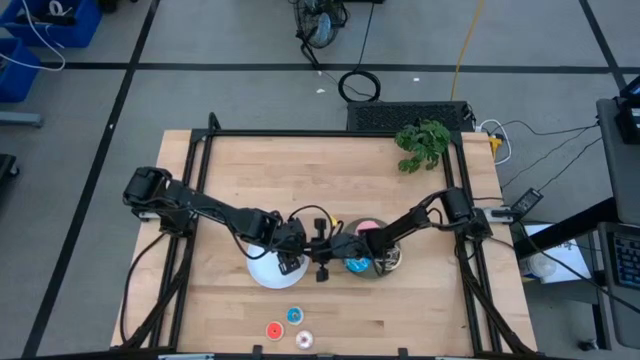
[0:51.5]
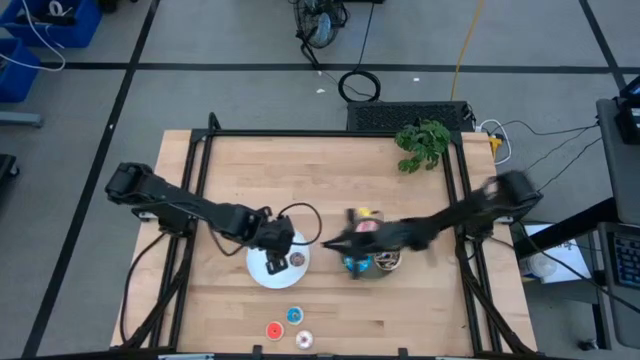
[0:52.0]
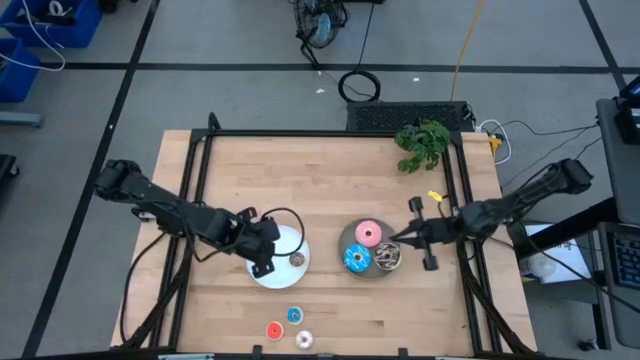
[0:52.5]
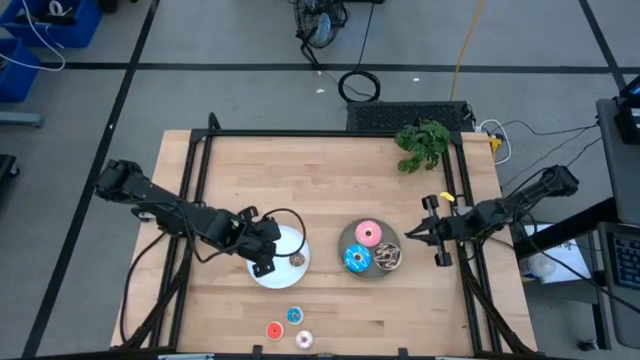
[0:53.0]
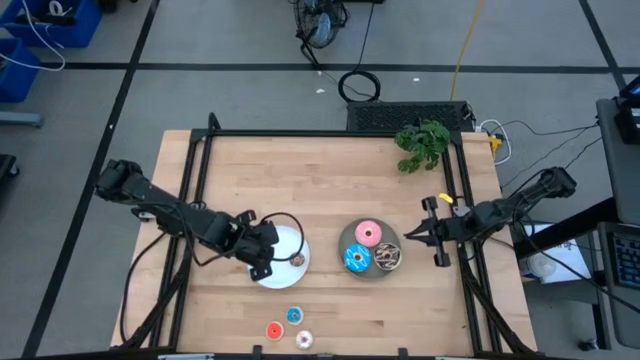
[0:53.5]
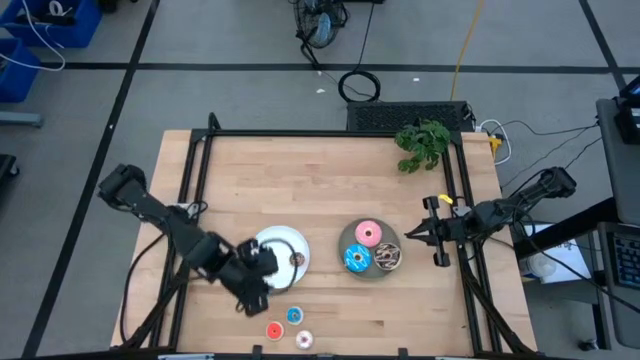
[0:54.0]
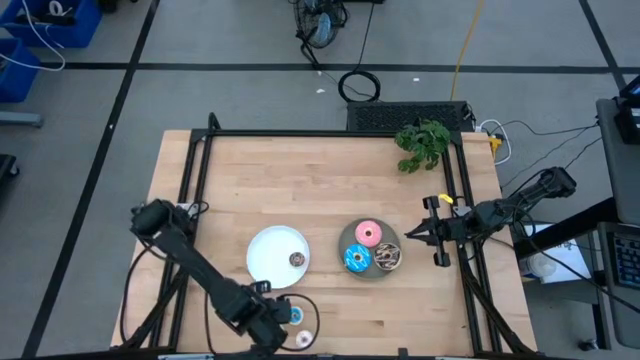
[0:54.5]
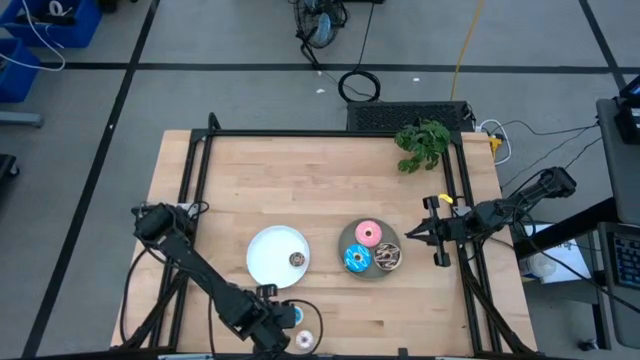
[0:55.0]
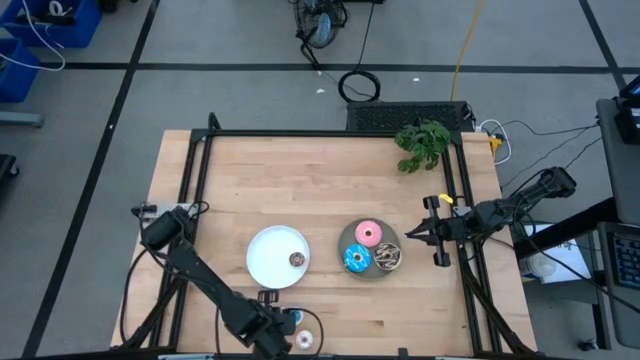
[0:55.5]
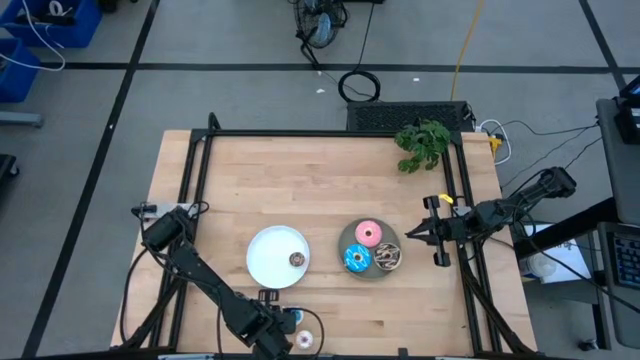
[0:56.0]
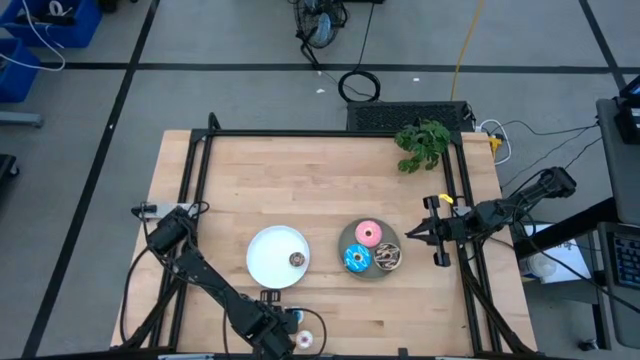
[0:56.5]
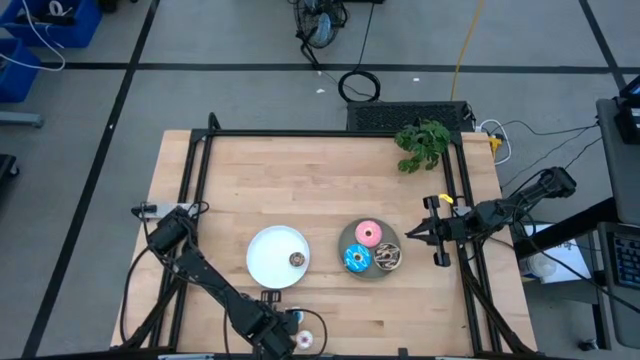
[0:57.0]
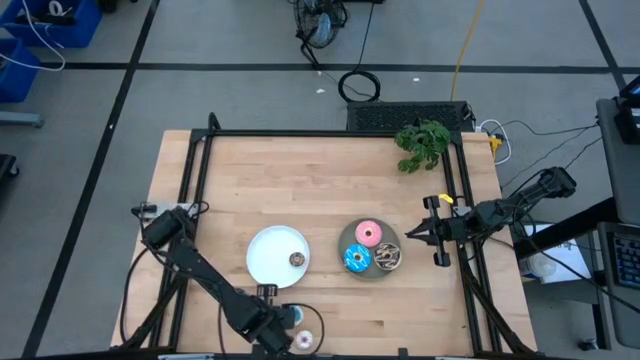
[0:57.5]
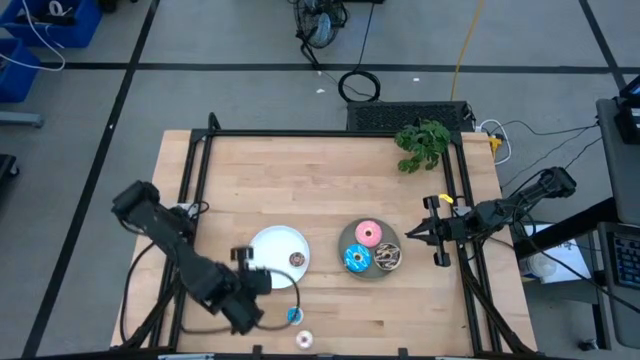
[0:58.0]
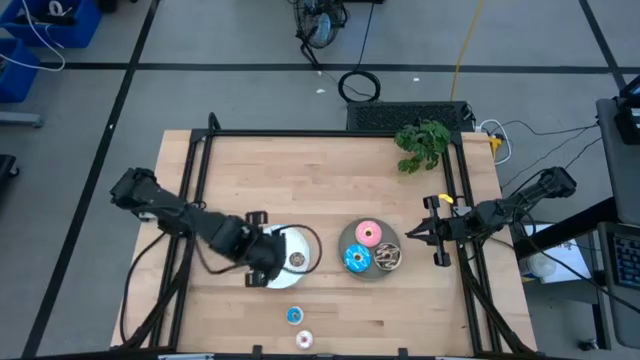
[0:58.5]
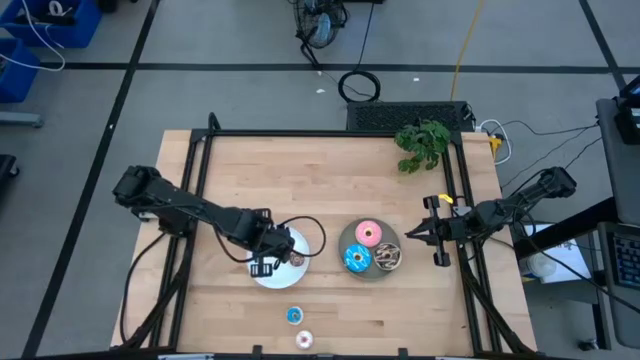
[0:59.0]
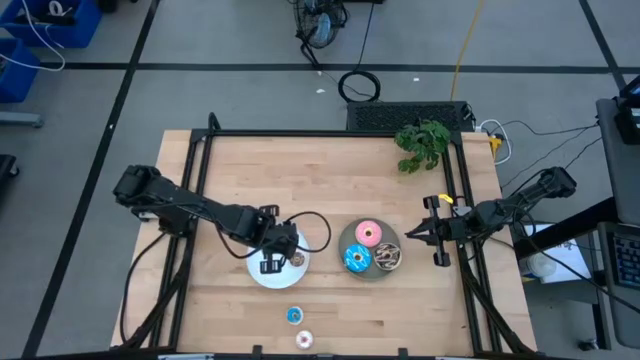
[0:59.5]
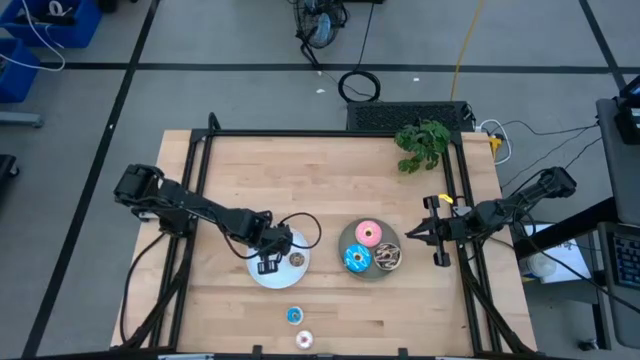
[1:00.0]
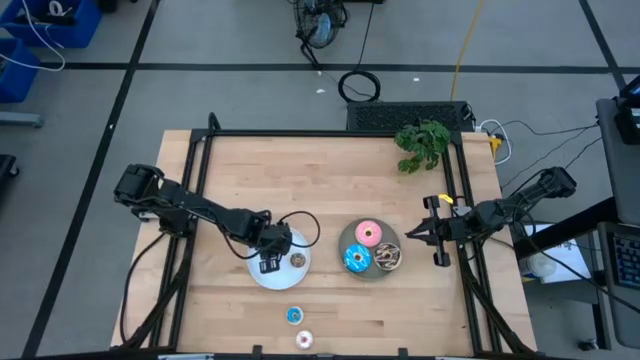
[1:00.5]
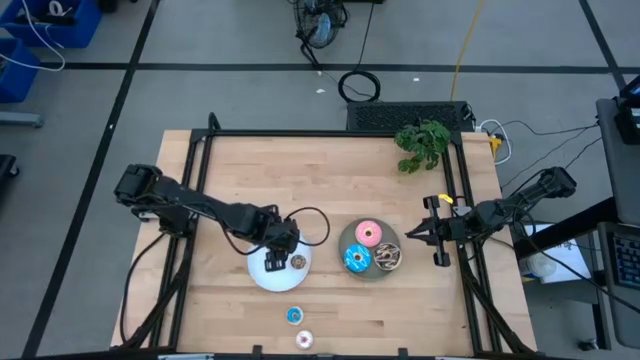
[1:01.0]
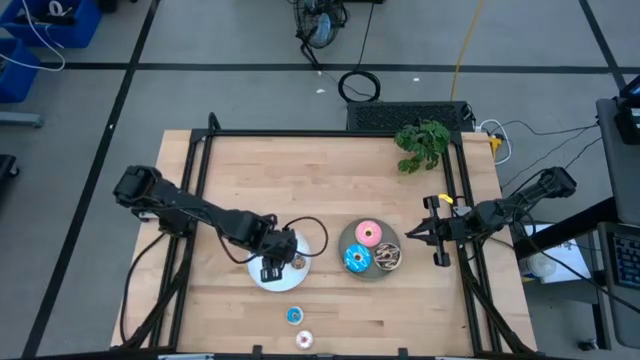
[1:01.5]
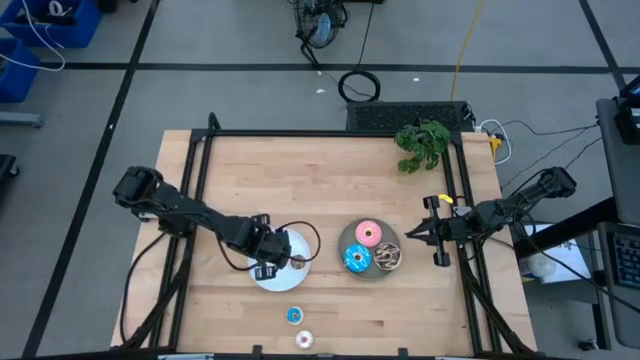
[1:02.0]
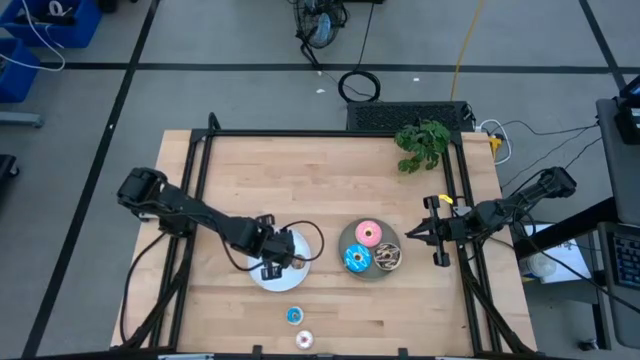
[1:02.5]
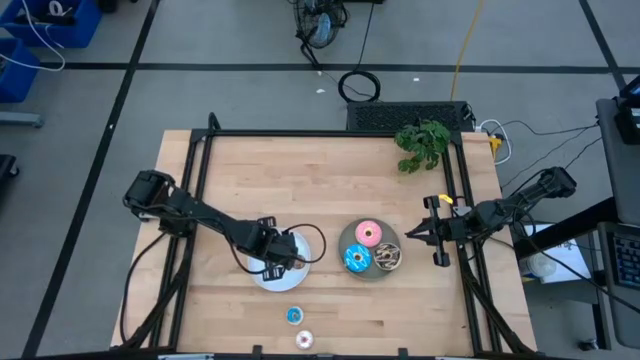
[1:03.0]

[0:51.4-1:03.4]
Task: Pick & Place donuts
Put the small orange donut on the white plate

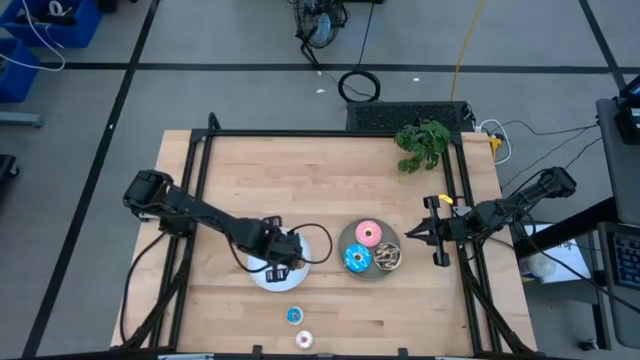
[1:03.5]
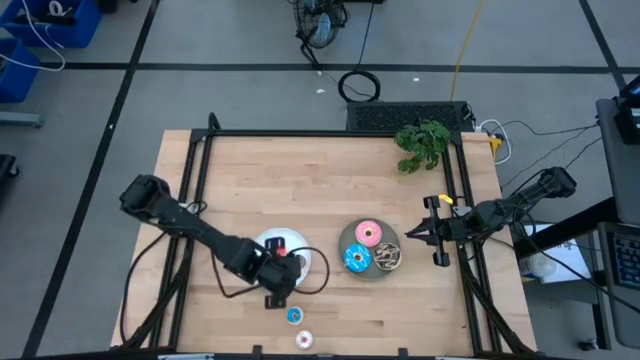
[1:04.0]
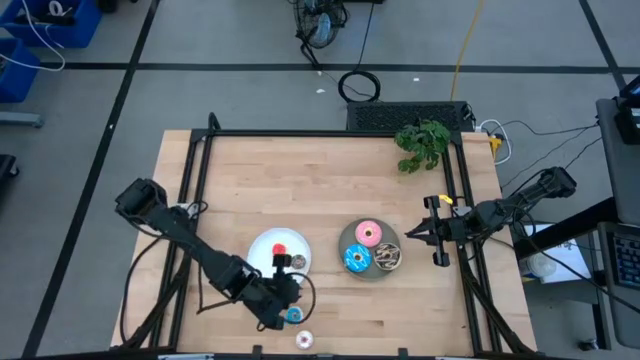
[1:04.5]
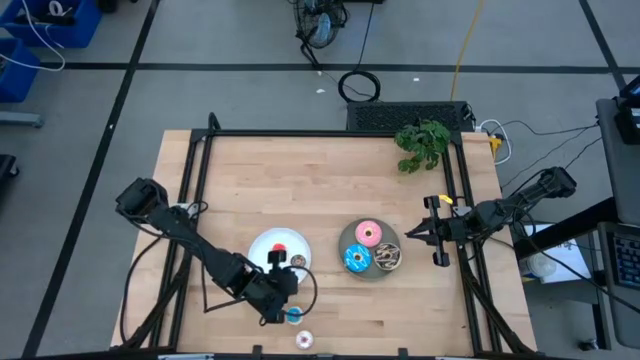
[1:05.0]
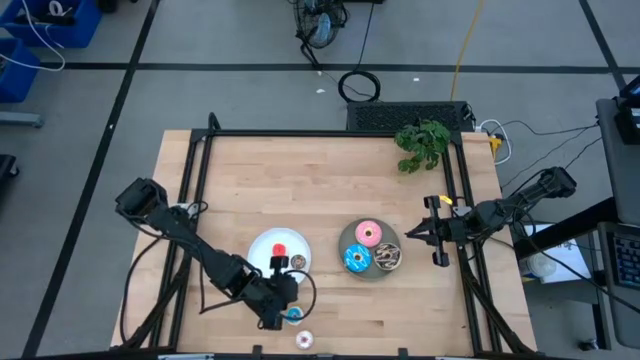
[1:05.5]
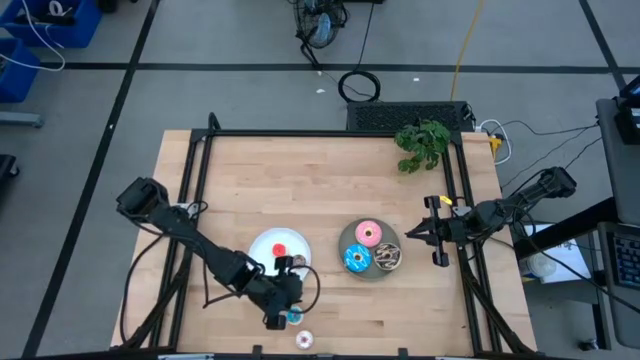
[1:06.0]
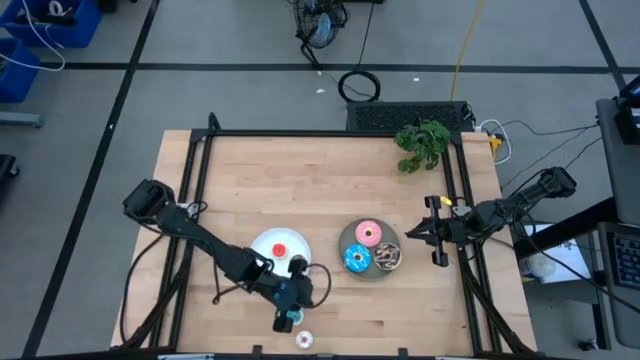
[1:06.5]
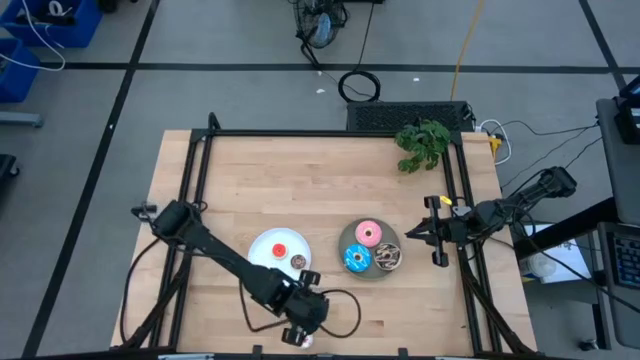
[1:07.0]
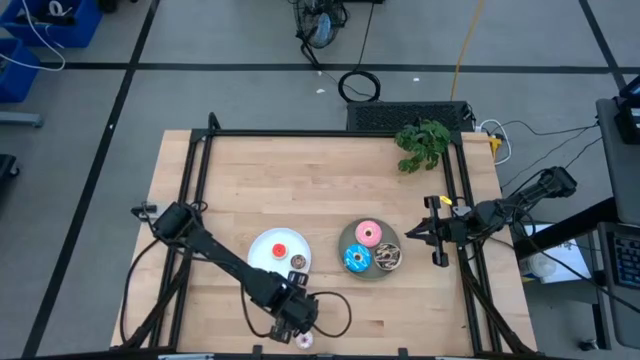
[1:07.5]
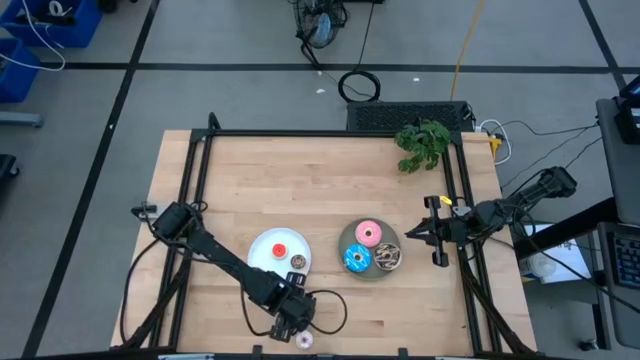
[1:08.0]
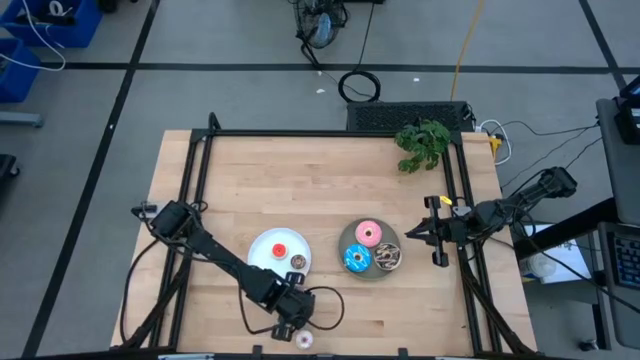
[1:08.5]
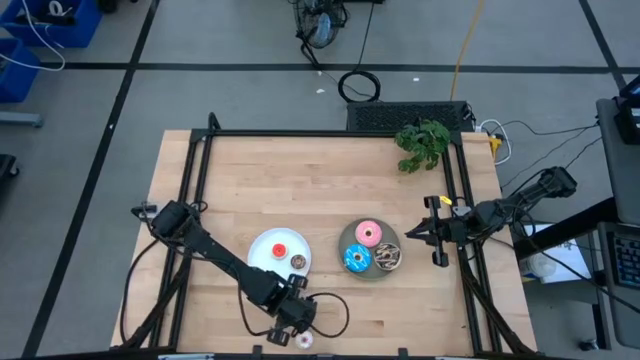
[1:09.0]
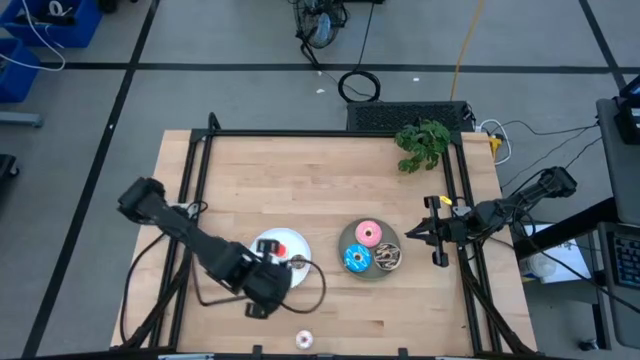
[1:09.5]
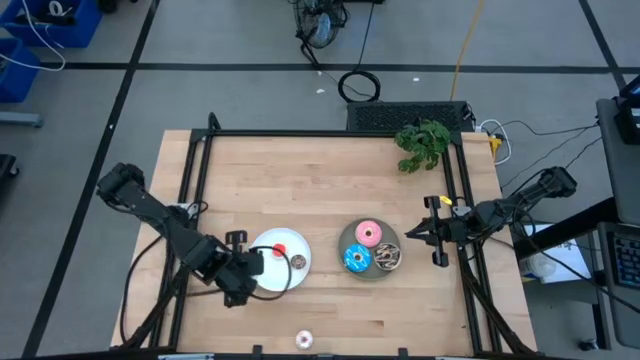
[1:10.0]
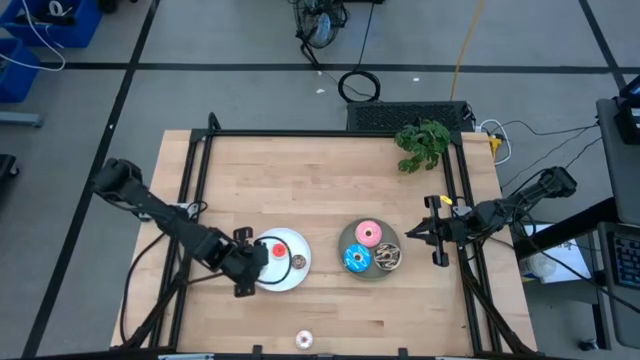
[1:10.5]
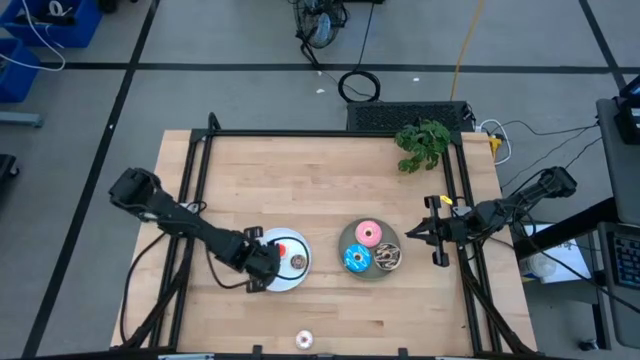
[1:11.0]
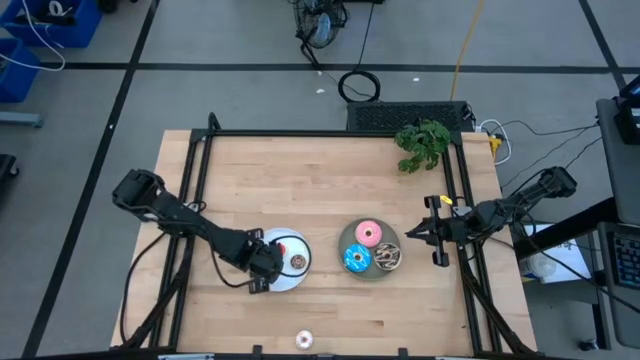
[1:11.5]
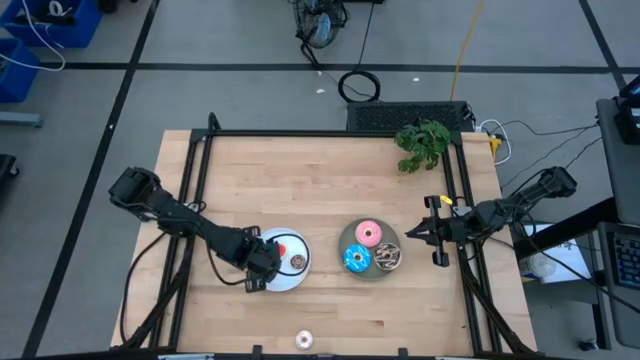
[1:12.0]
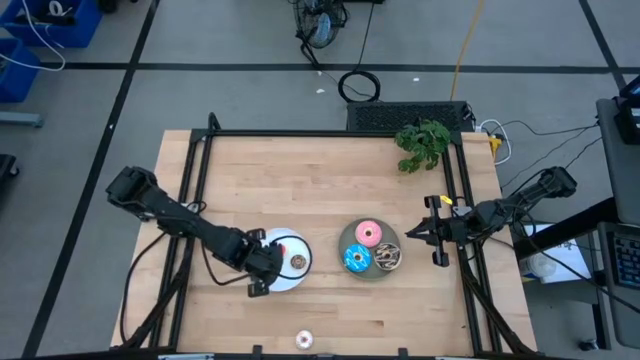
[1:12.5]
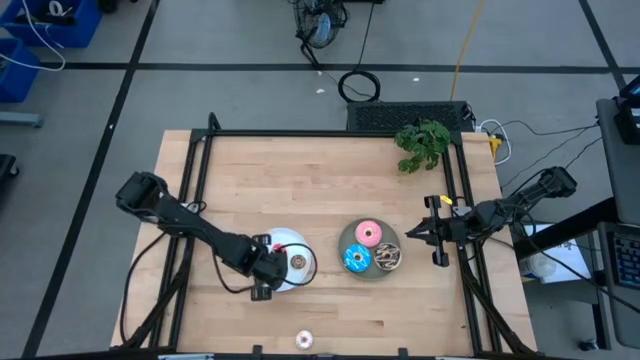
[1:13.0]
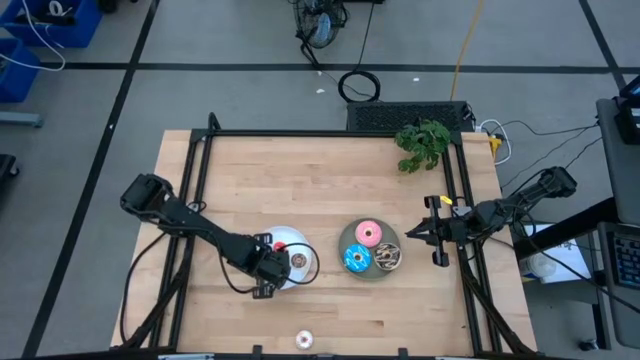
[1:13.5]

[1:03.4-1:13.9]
Put the small blue donut on the white plate
